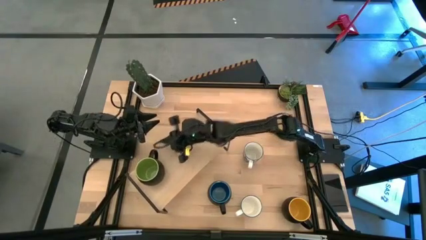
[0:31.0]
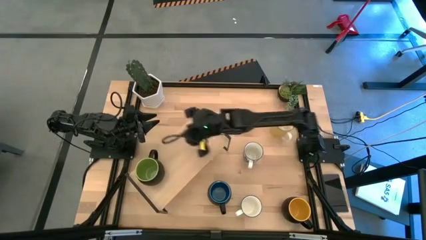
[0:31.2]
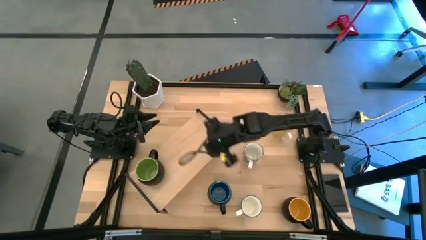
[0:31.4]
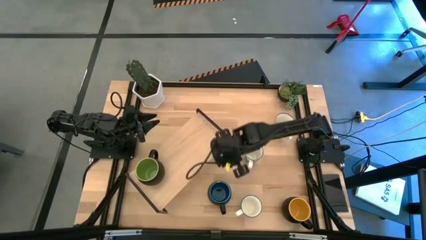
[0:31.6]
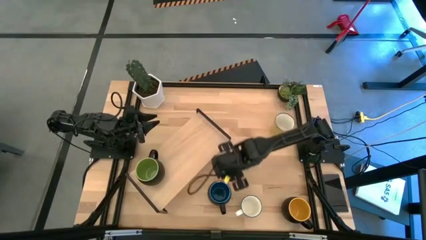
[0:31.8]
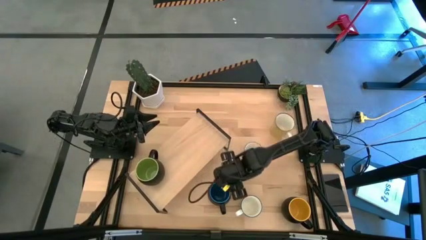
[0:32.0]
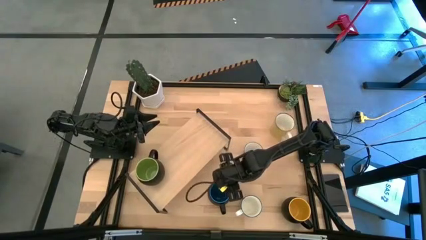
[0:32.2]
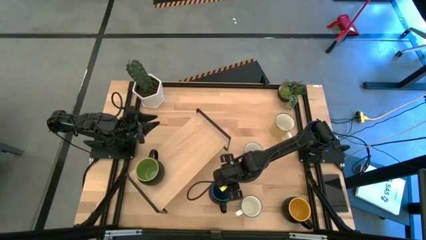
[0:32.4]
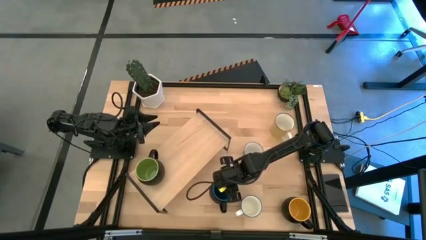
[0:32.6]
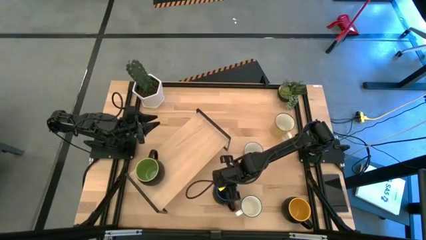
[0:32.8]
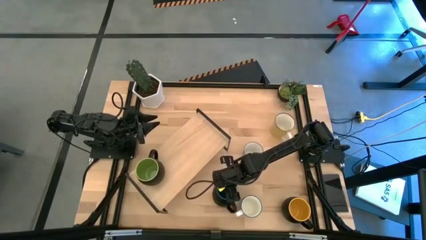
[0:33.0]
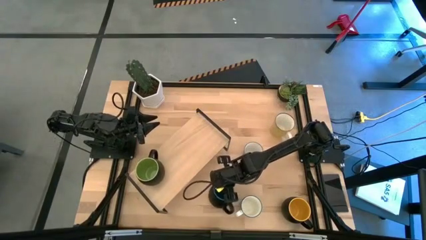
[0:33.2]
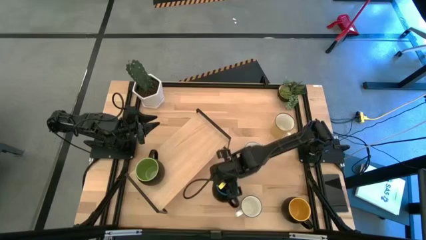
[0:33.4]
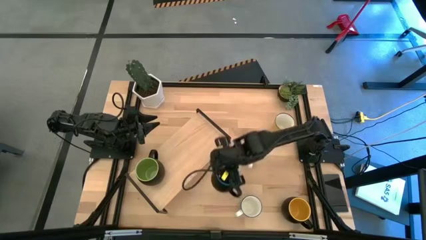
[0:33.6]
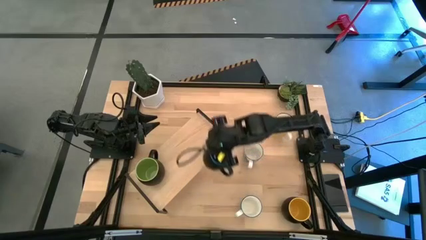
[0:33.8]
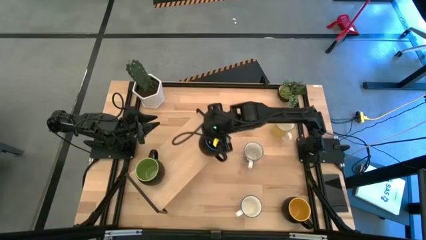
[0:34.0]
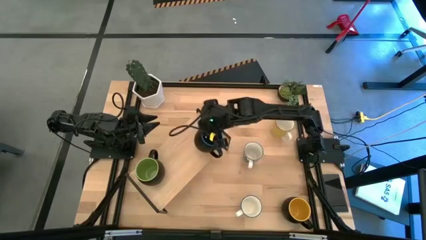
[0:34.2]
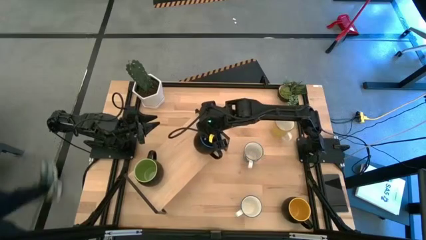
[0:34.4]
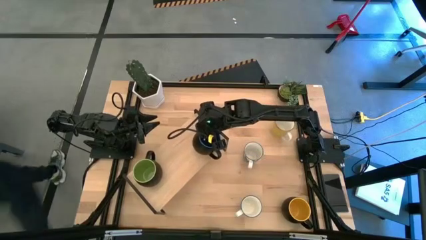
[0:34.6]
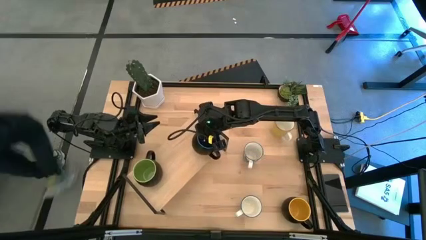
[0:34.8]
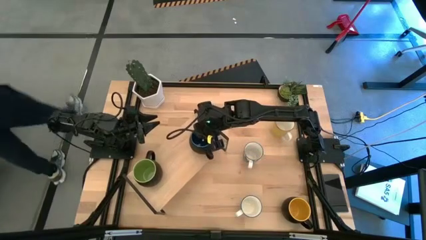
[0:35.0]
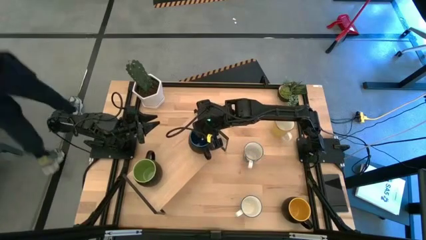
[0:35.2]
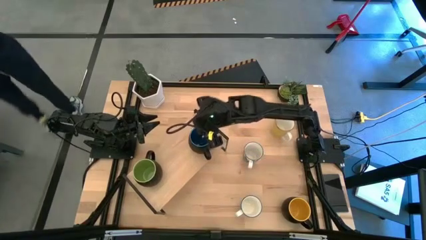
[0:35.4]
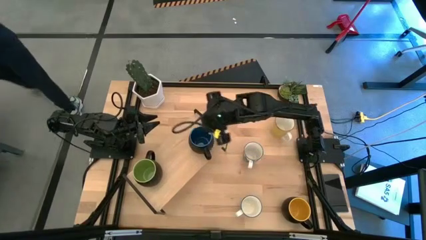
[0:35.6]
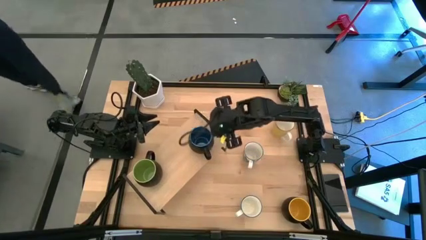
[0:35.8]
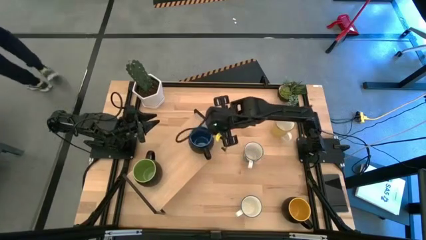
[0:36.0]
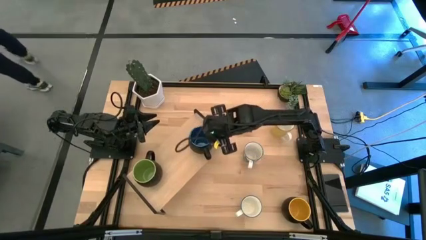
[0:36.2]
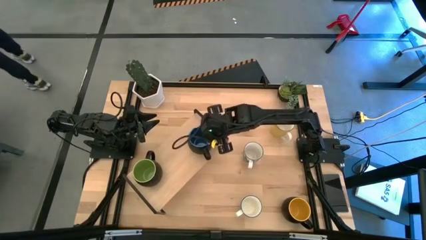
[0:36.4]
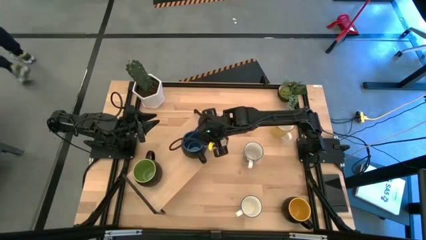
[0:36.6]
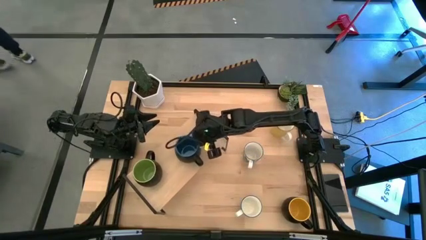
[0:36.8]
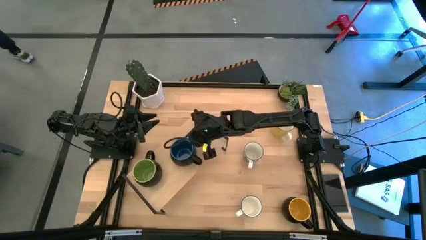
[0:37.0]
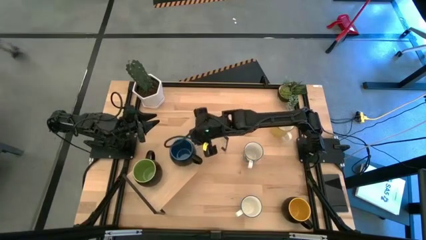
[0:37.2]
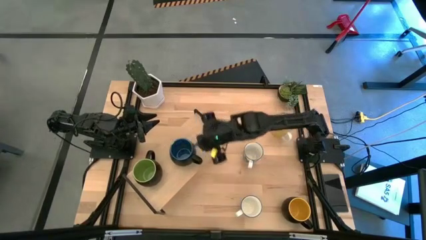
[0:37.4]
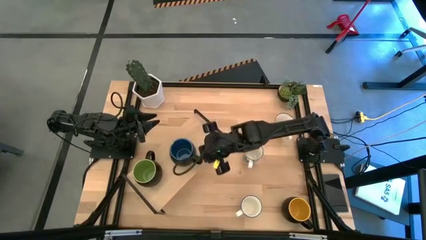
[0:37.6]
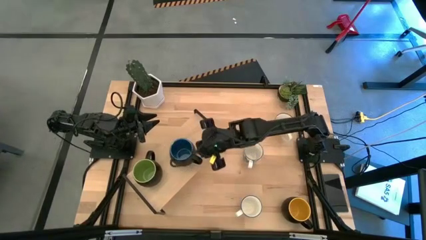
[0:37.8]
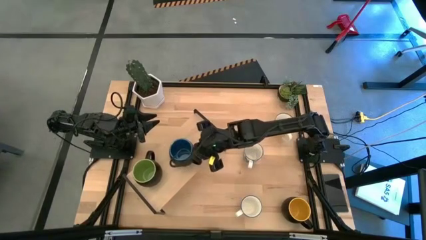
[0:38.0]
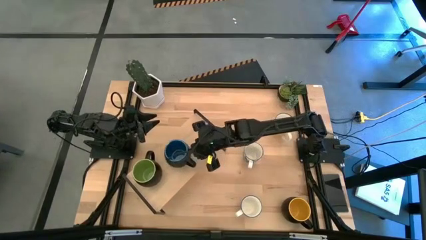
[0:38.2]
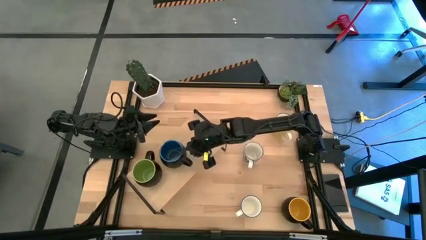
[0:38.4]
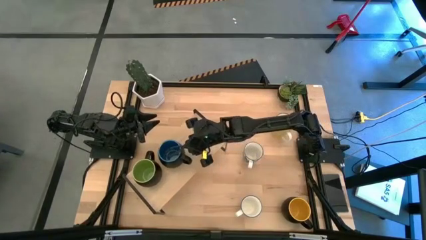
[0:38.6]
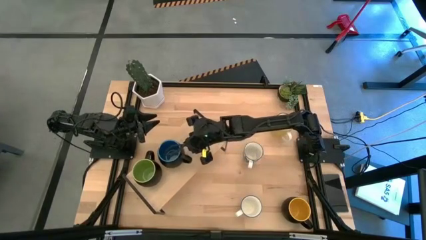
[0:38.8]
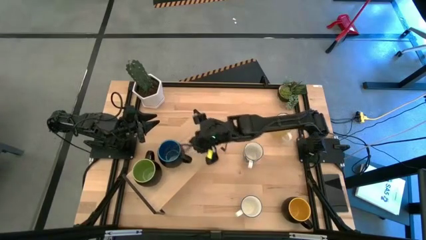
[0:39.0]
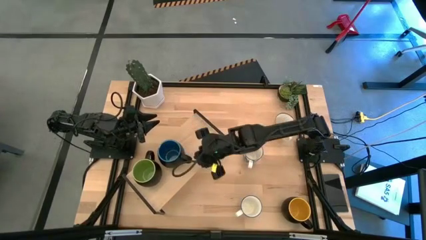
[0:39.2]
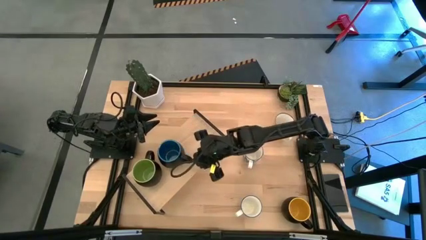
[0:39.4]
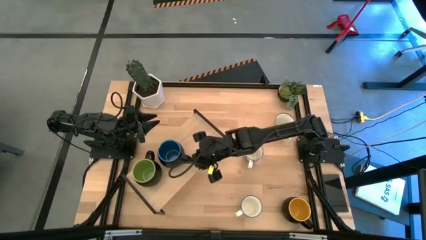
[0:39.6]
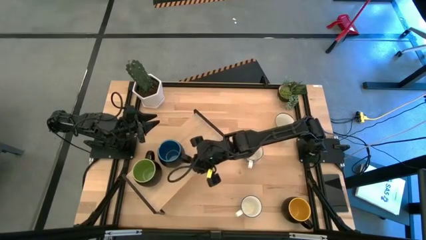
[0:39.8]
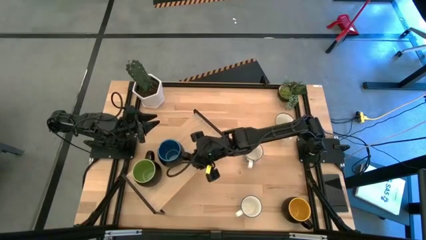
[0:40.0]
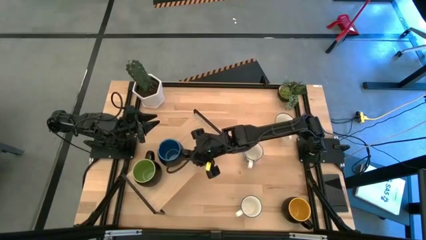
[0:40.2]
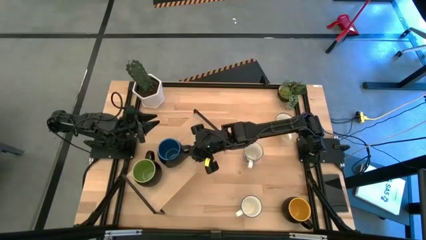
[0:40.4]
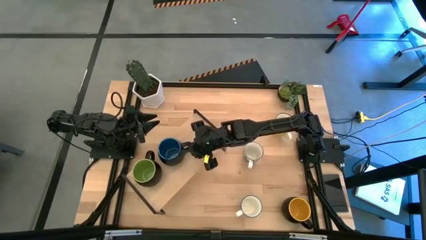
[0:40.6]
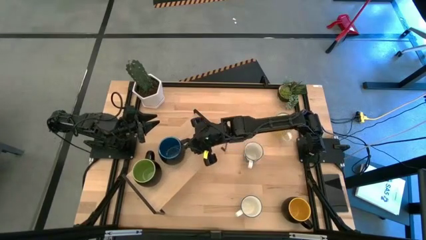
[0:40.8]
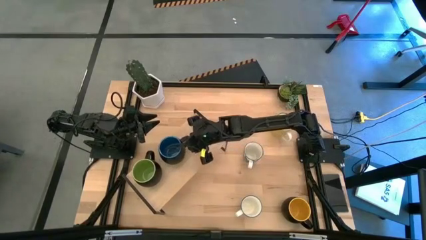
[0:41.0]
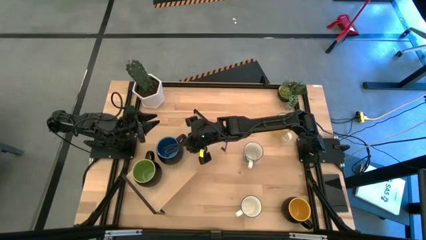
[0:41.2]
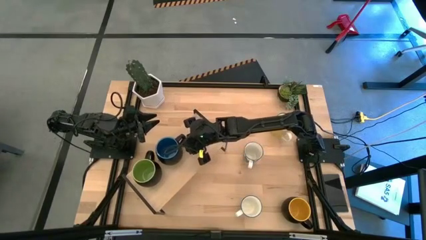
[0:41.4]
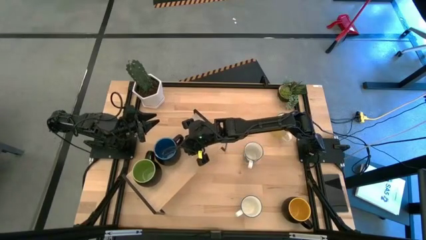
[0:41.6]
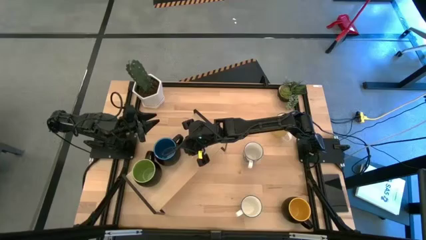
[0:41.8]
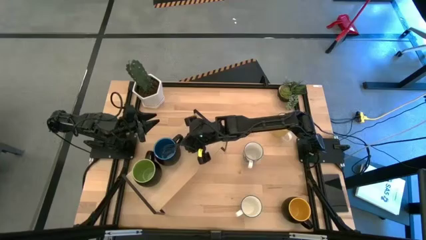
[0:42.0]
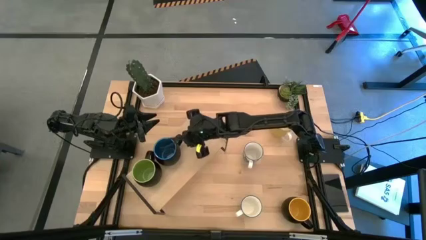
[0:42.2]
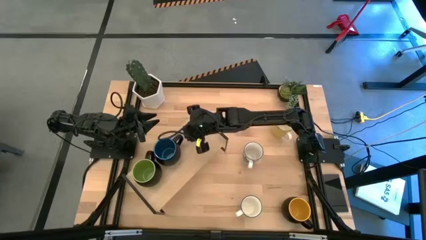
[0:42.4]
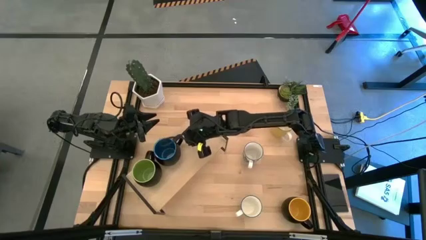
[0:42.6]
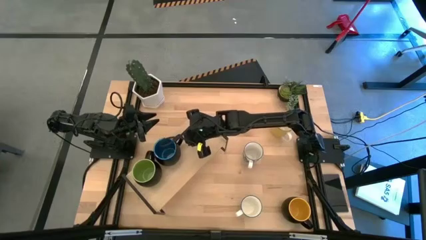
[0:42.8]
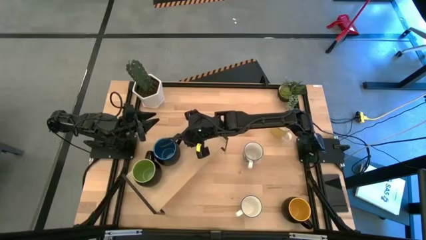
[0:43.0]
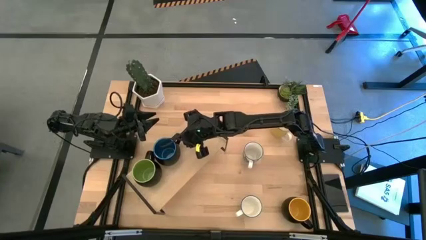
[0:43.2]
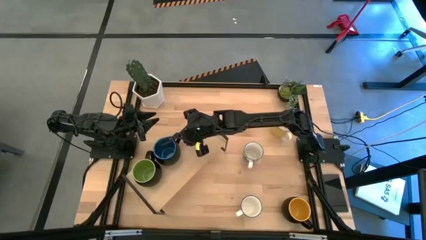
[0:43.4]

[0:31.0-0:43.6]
Task: Place coffee mugs
Put the blue black mug on the shelf
